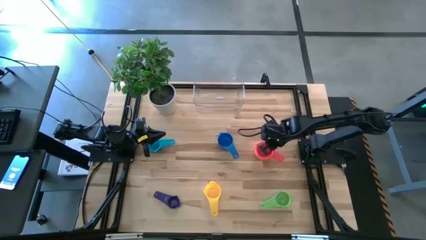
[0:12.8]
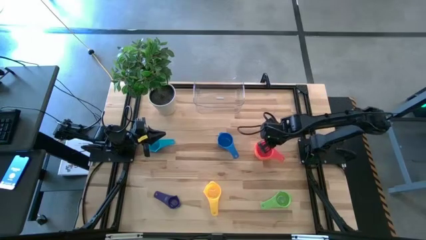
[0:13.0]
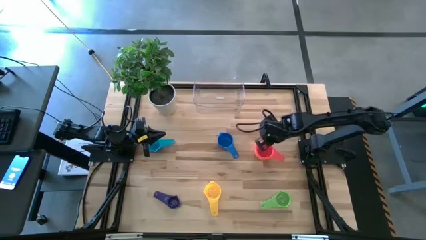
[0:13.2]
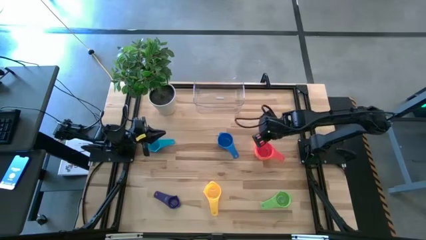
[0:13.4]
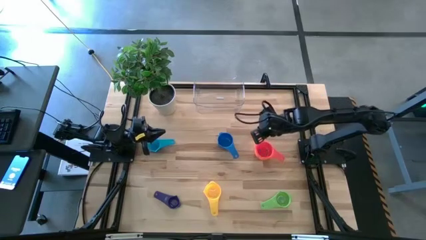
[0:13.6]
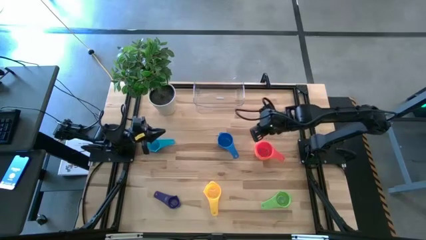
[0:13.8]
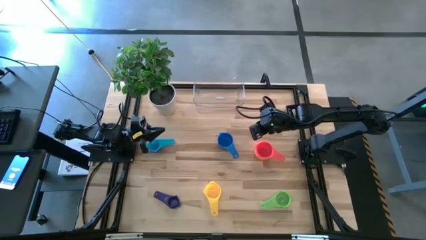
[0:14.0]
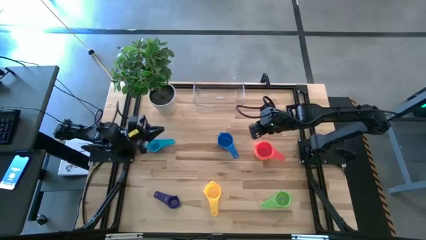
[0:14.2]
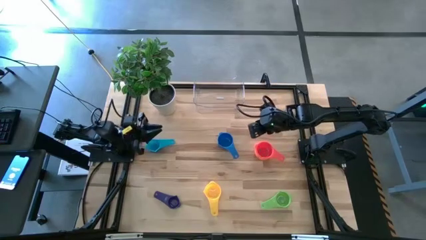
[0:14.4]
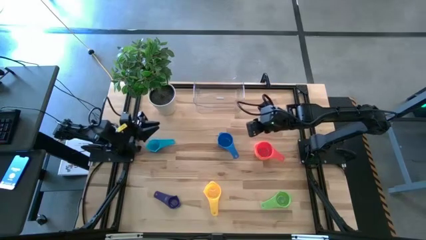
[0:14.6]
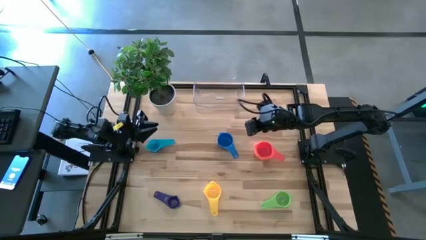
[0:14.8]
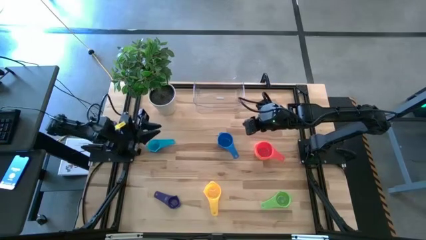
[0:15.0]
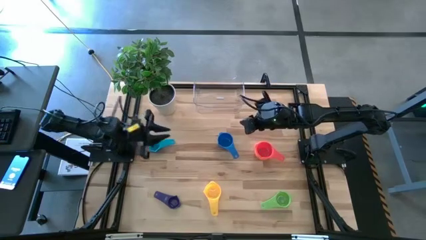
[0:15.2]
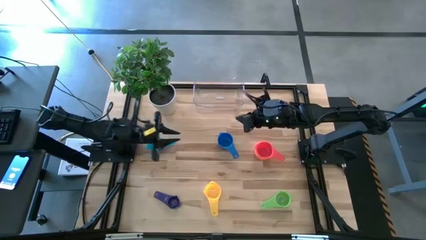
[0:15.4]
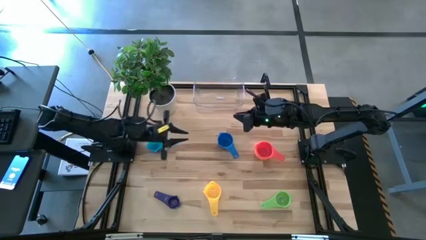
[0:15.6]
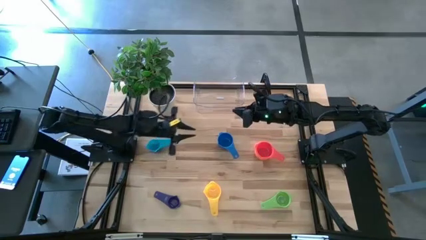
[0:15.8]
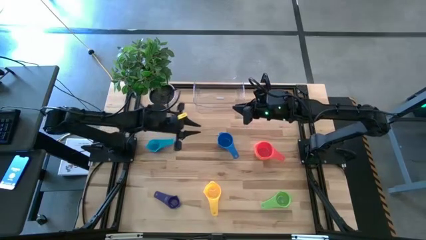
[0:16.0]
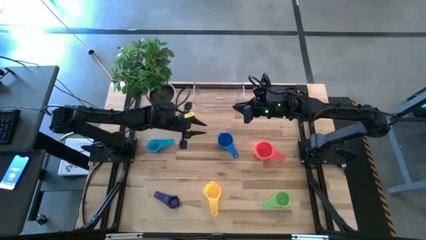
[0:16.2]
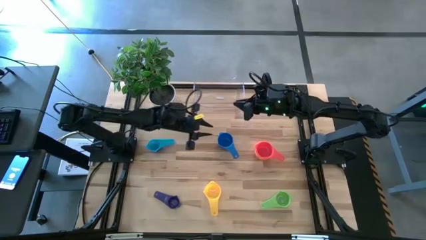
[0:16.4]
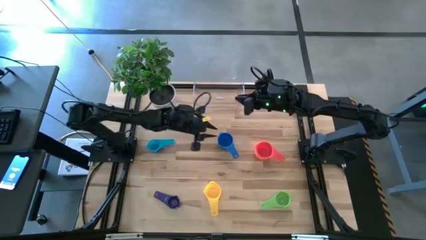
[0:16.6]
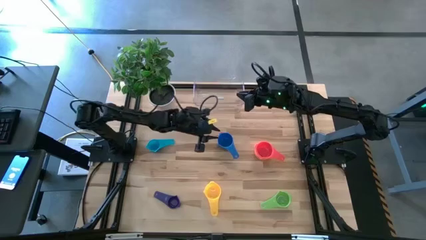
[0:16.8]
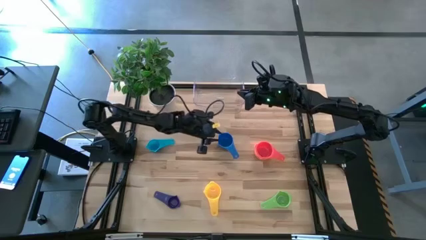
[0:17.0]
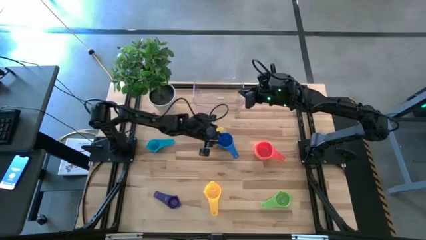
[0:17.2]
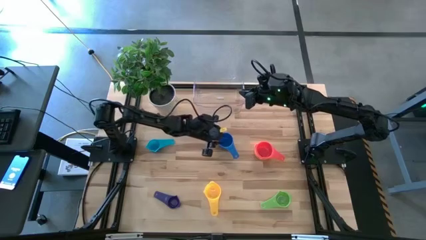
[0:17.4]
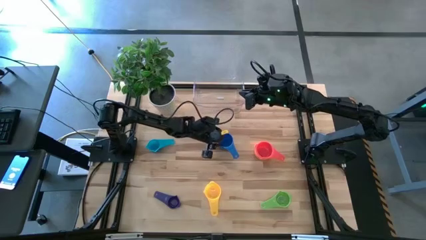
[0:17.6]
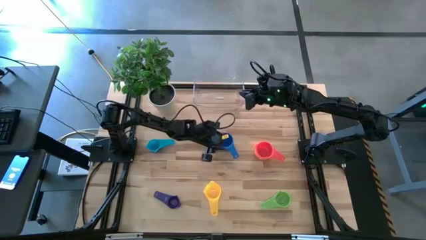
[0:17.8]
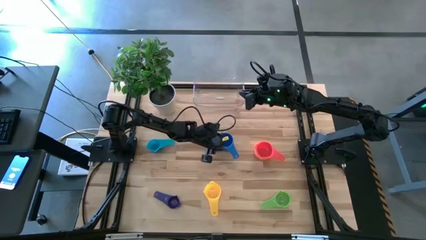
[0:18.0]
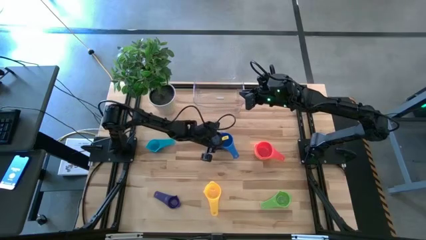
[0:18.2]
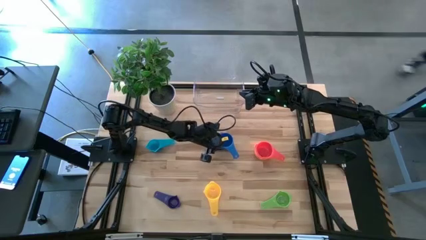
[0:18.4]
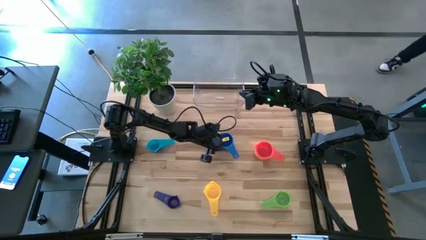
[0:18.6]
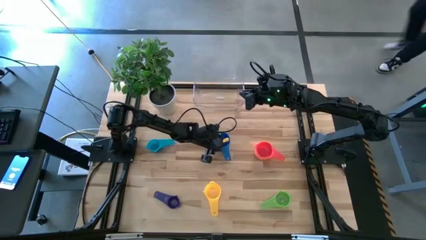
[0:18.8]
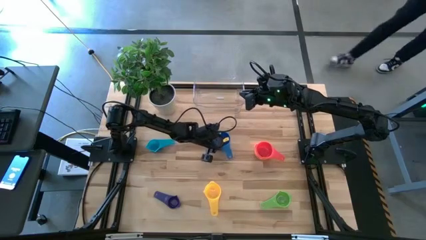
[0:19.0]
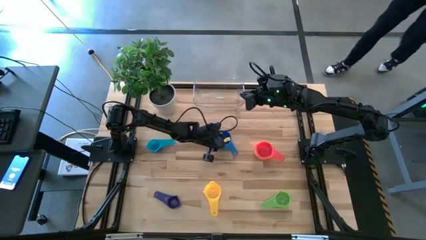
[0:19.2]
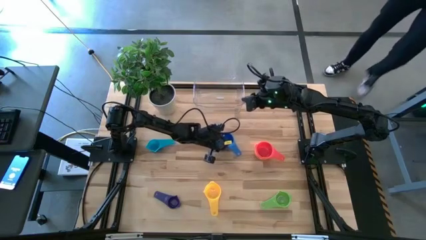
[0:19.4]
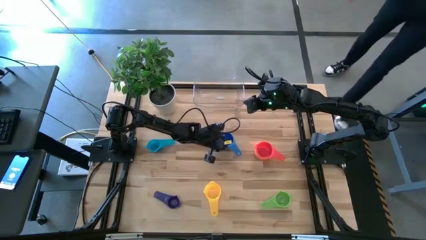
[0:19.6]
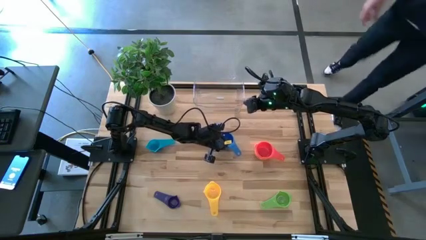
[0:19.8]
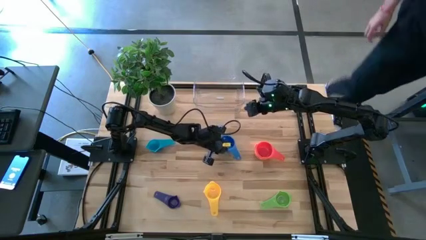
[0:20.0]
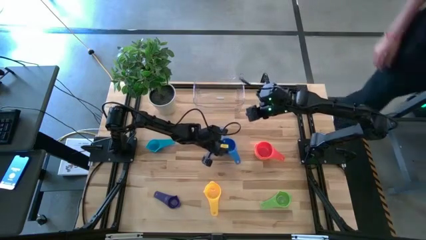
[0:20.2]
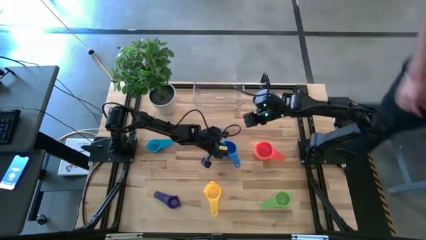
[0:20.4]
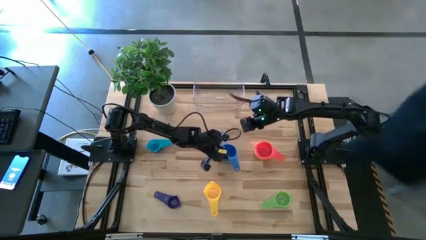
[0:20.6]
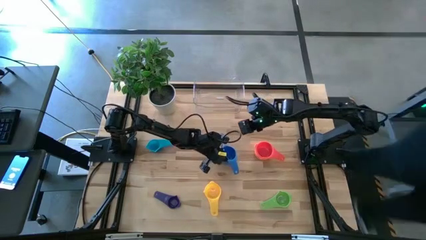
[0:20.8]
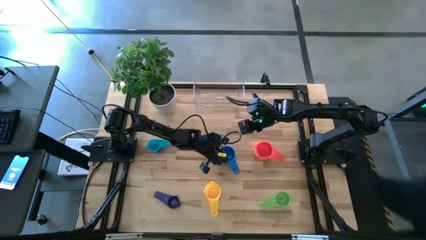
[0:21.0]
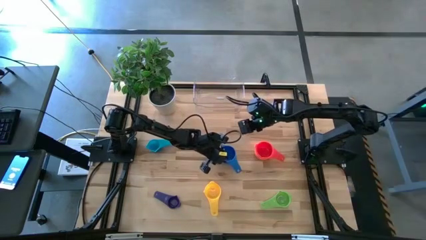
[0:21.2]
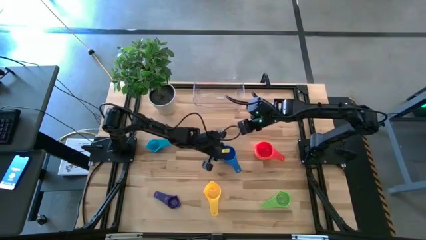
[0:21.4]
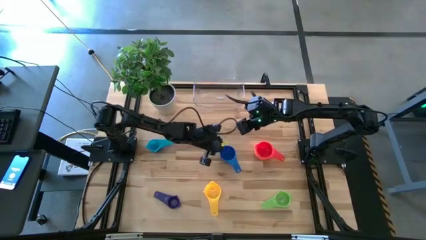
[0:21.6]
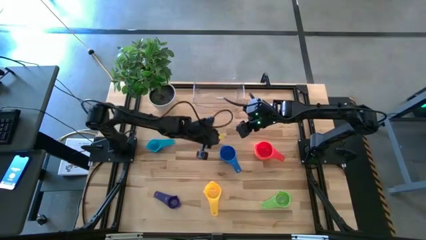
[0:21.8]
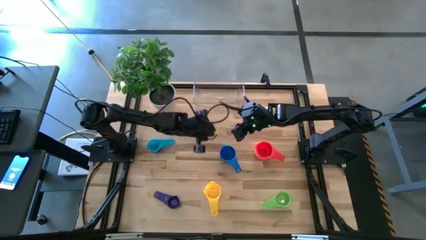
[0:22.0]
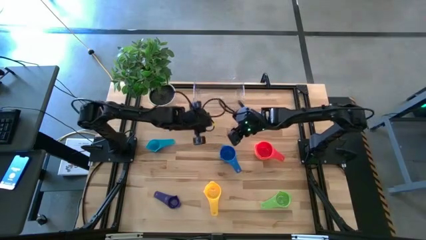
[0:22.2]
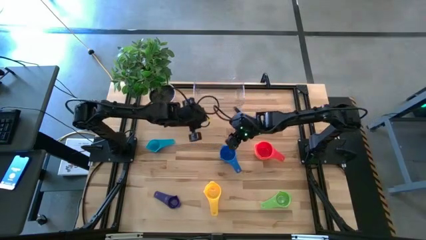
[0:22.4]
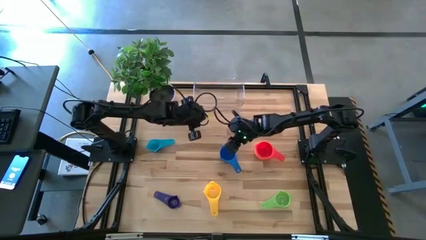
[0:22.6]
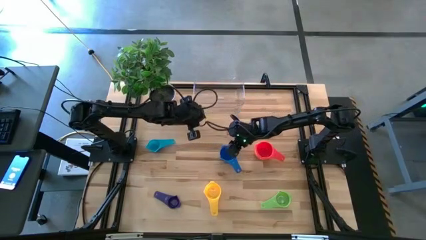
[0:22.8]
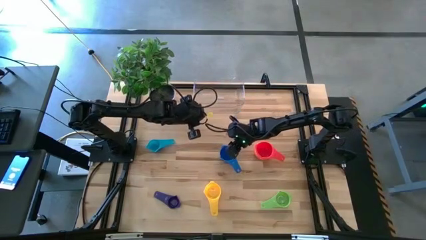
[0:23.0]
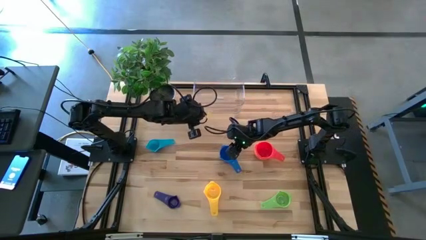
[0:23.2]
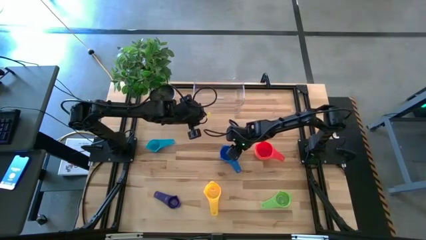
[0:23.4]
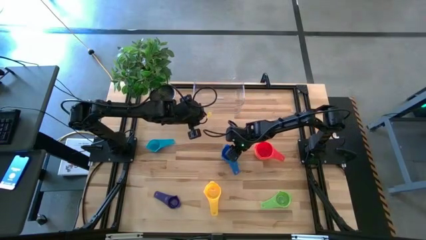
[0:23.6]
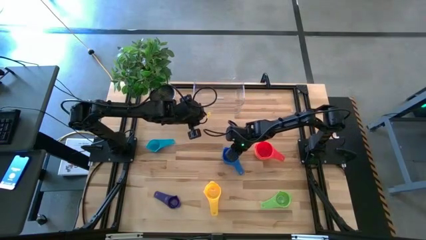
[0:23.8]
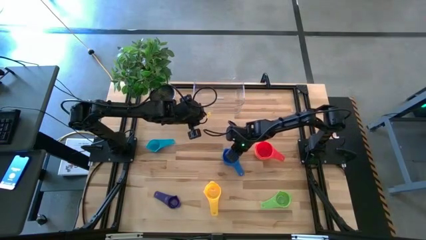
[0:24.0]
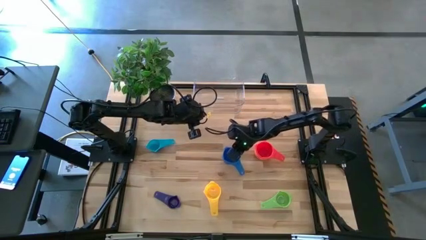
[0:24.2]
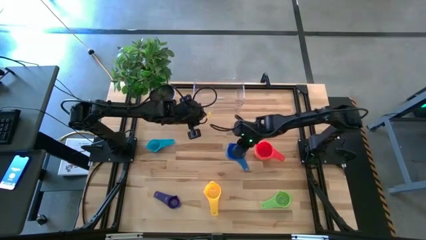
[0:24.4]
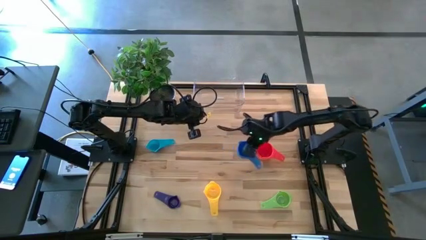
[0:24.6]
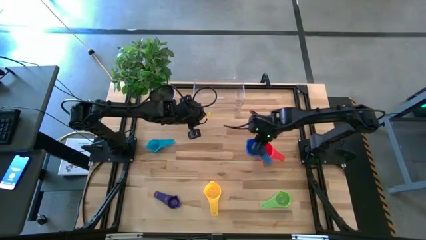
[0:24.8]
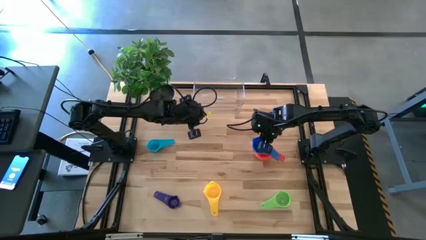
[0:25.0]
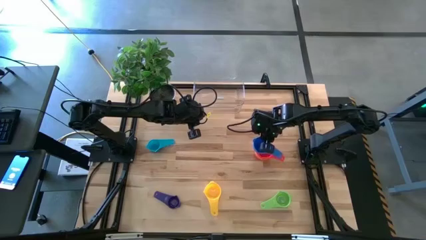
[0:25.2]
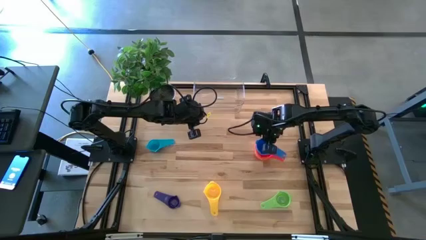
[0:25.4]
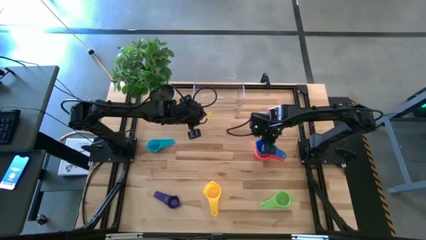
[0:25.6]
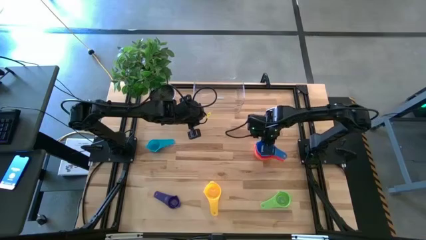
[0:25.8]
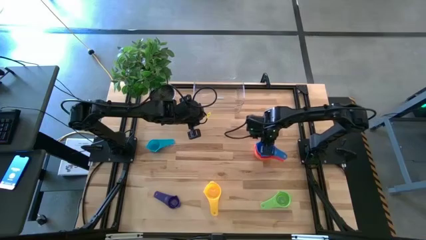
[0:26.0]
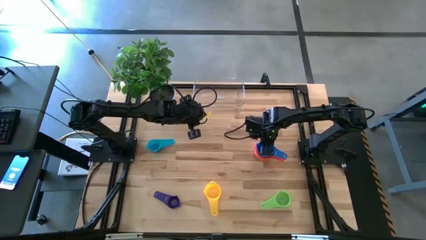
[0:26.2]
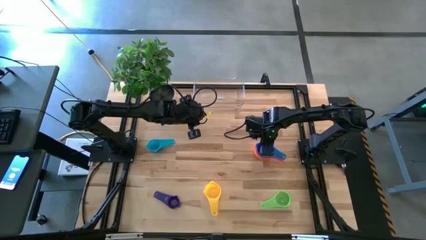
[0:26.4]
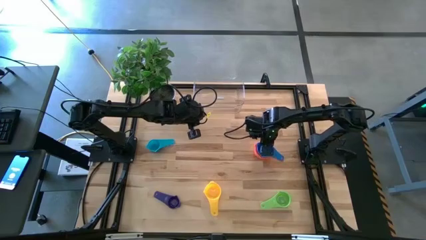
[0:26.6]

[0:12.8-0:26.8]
Task: Nest measuring cups in basket
Stack the blue measuring cup on top of the red measuring cup
